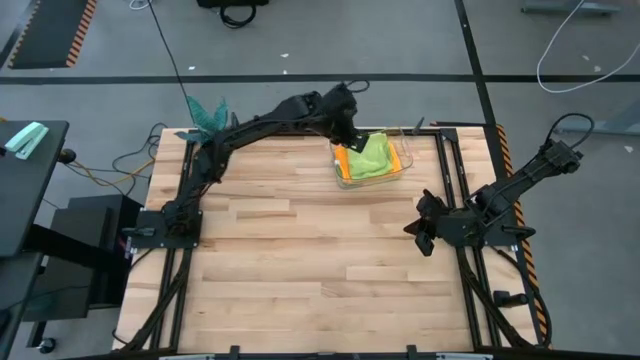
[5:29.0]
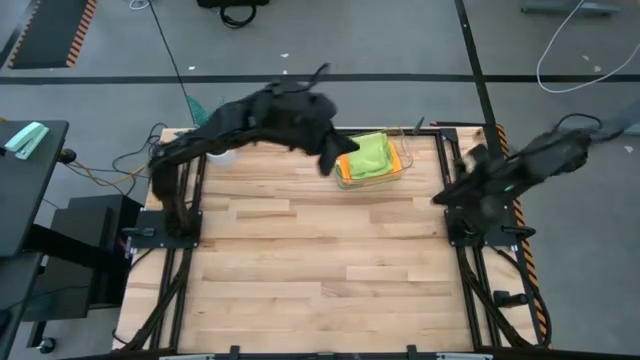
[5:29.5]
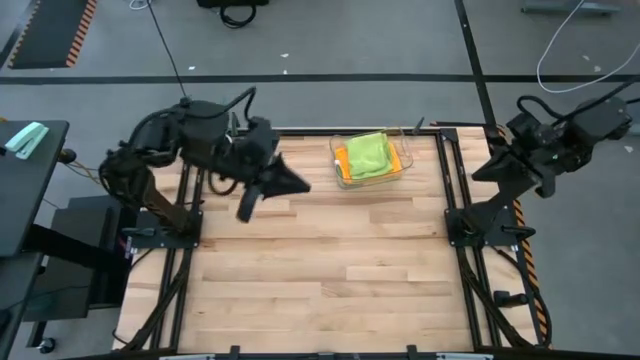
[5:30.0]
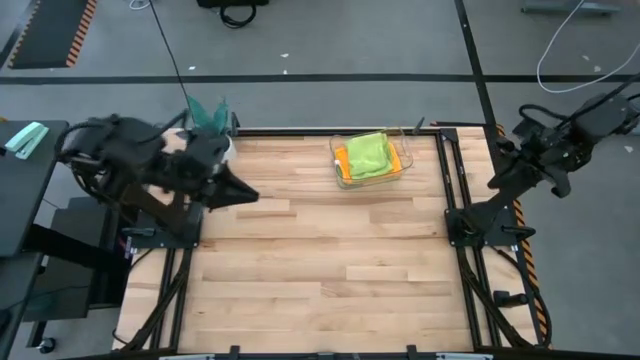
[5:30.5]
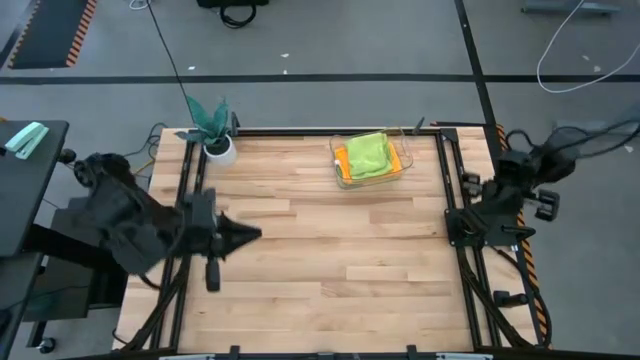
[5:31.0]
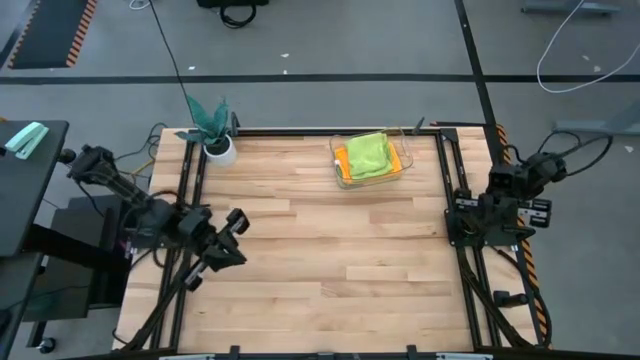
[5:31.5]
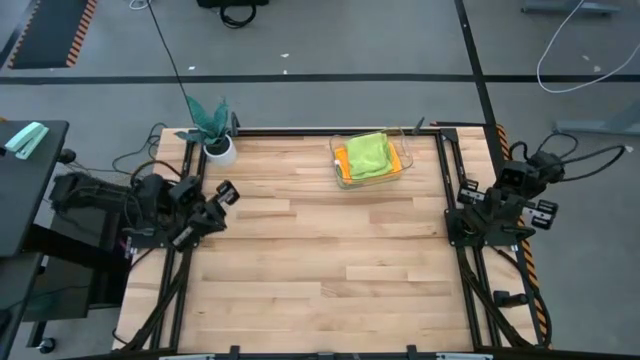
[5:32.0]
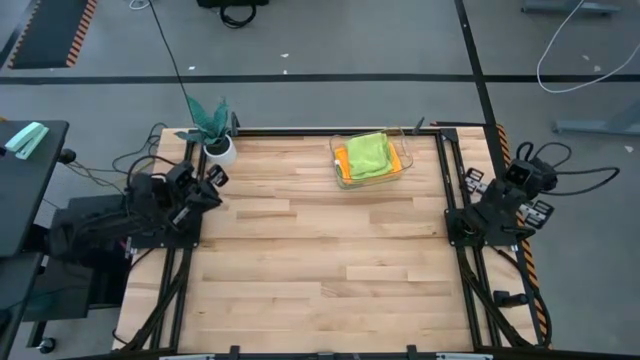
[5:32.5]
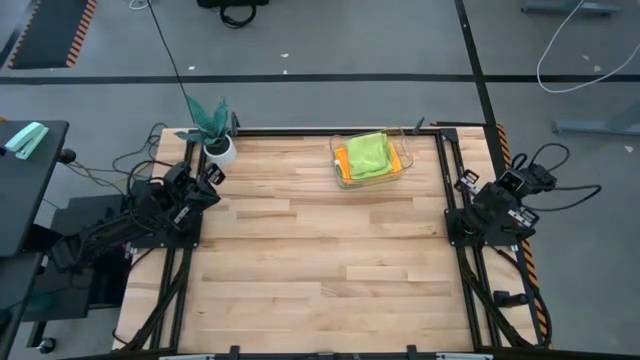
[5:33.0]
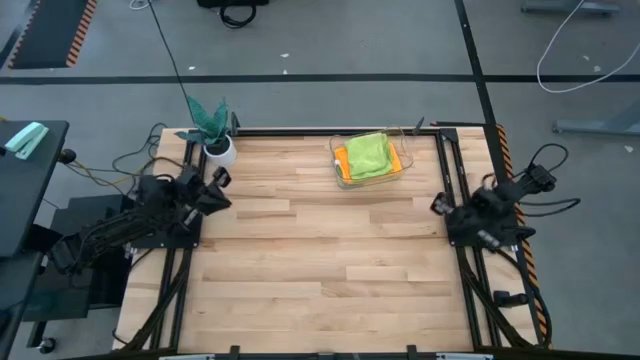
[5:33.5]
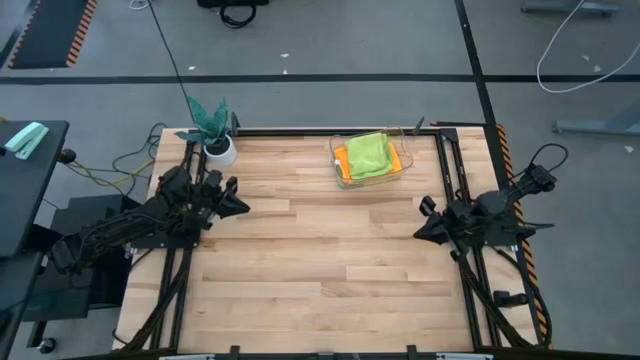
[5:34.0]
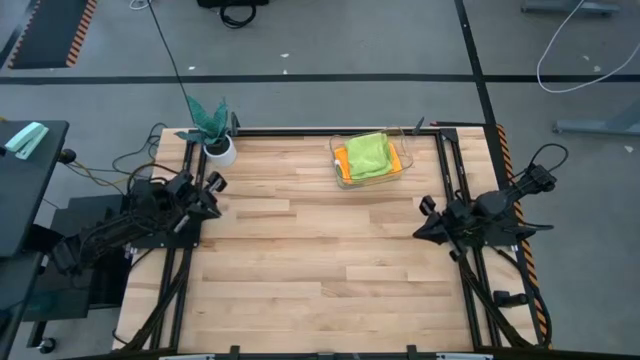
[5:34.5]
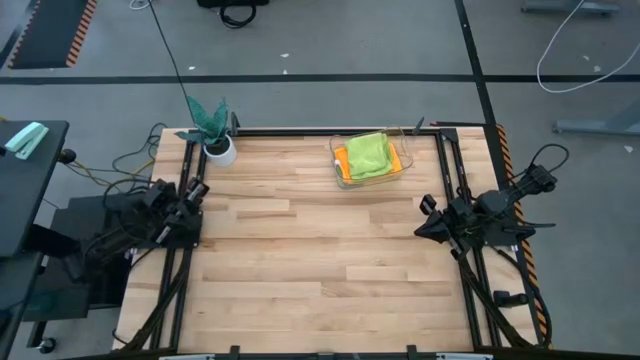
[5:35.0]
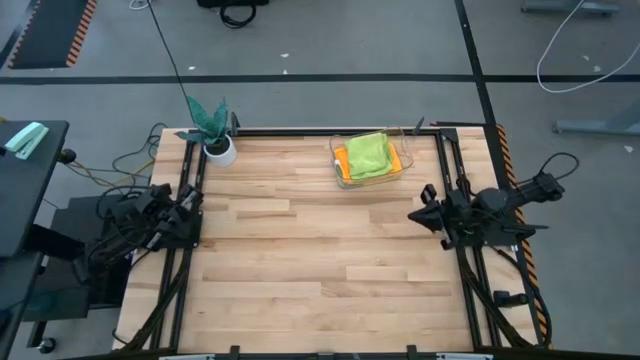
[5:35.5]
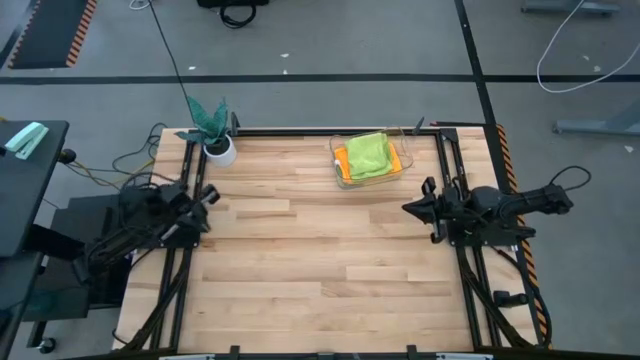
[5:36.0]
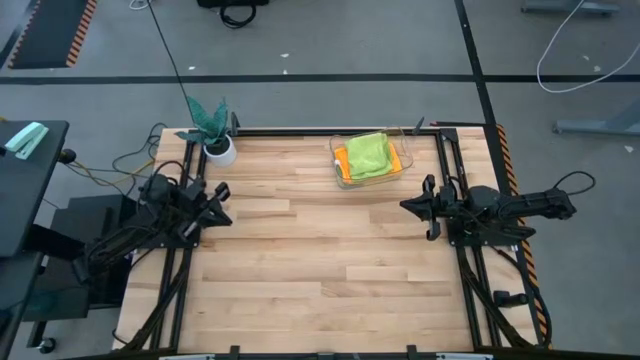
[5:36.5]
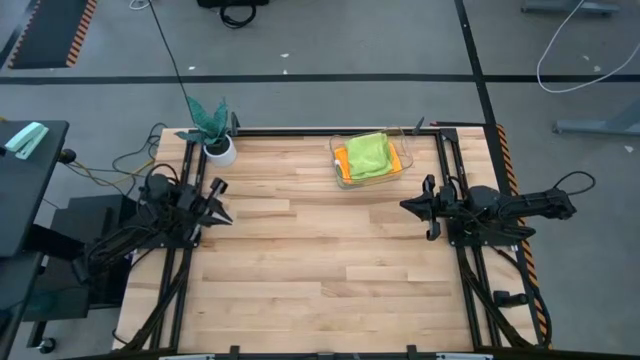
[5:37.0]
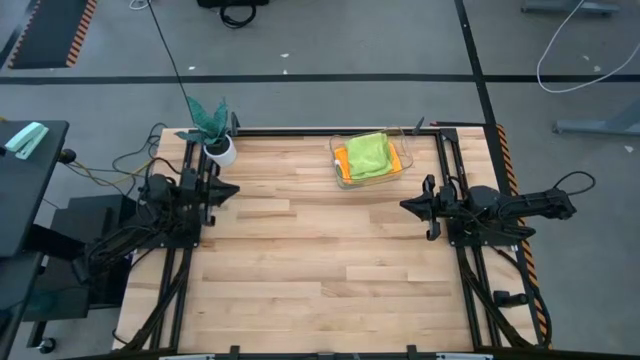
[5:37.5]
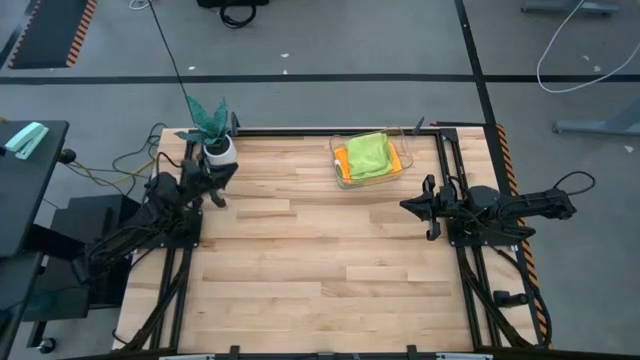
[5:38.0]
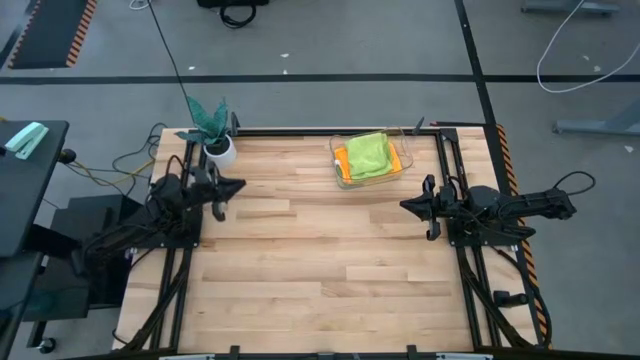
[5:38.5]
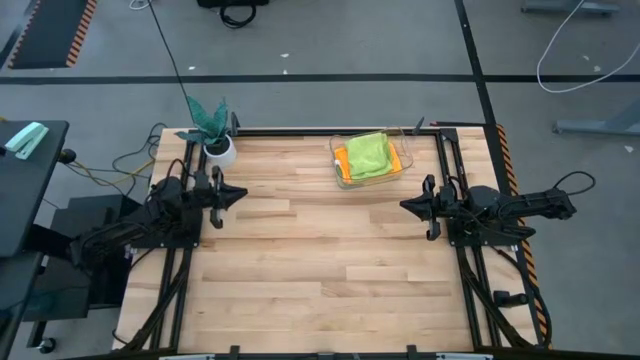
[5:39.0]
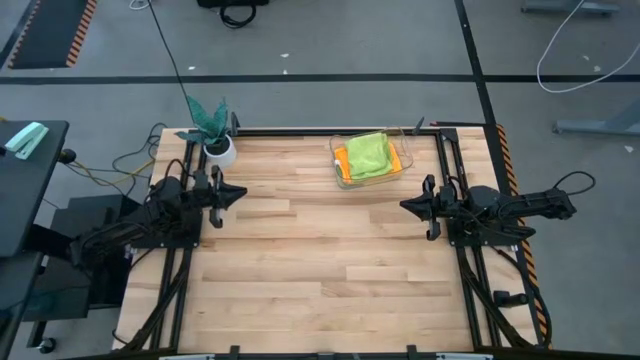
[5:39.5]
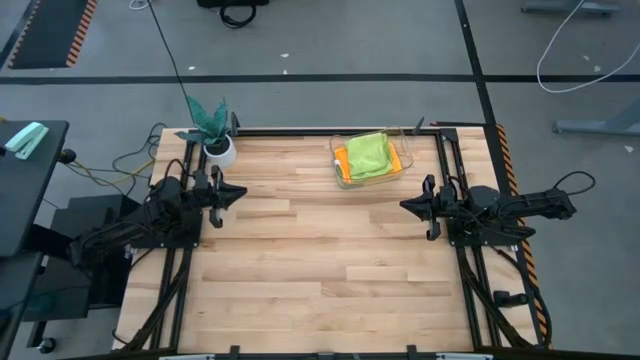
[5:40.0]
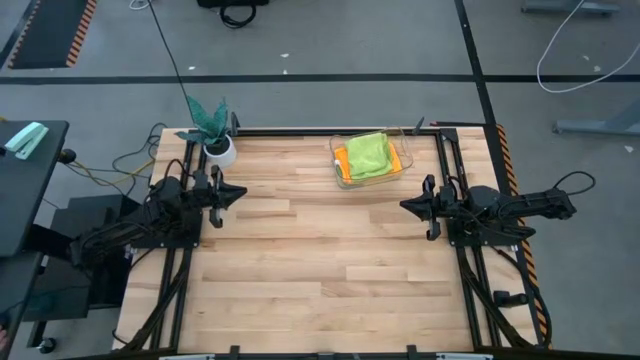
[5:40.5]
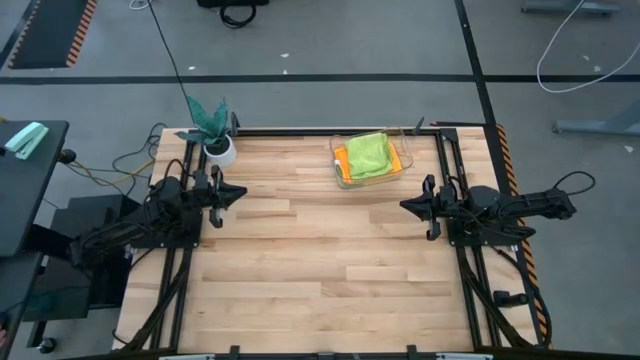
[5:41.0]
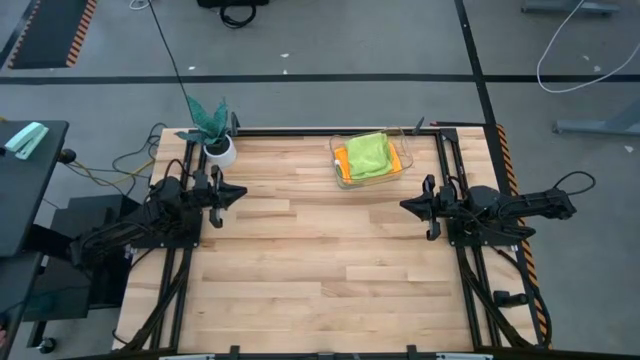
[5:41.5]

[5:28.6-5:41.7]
Task: Fold microfiber towels
Return to Home Position

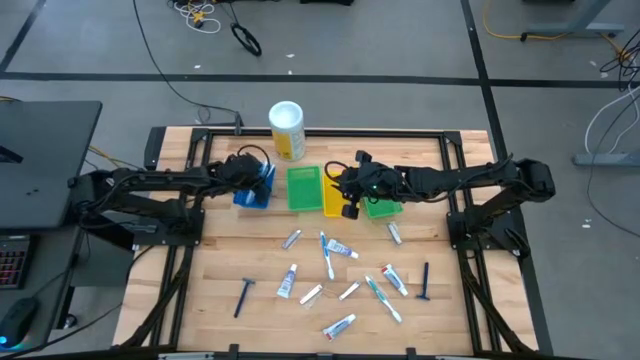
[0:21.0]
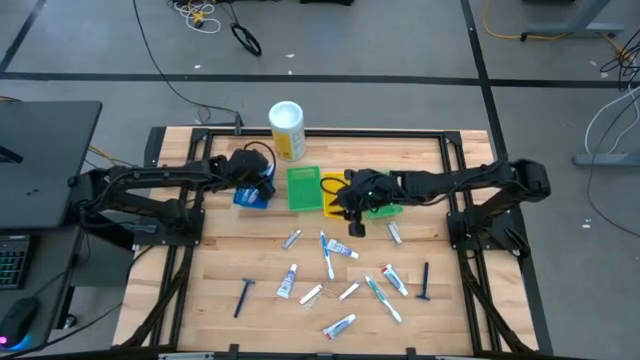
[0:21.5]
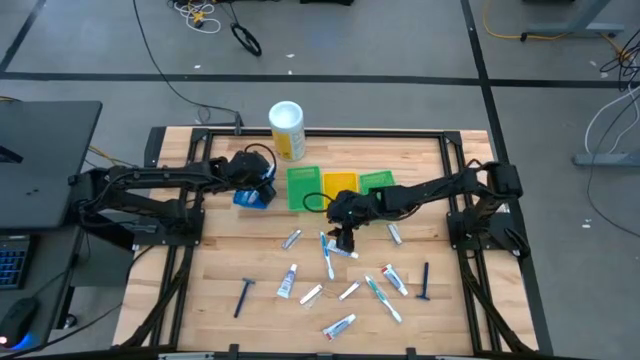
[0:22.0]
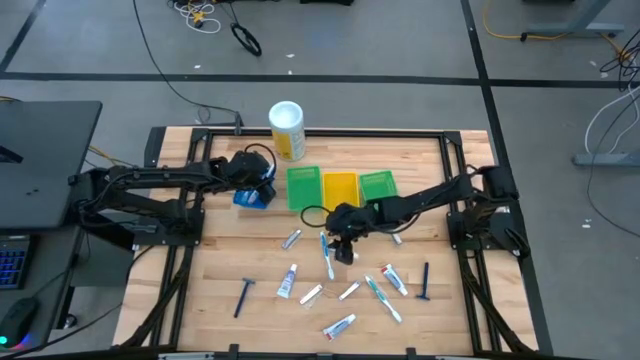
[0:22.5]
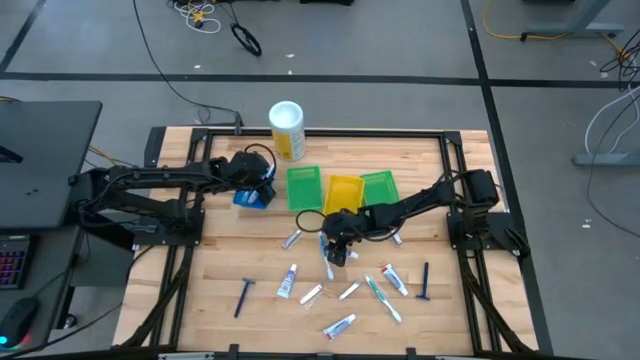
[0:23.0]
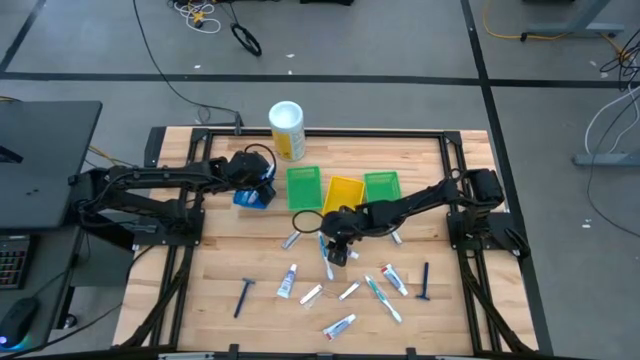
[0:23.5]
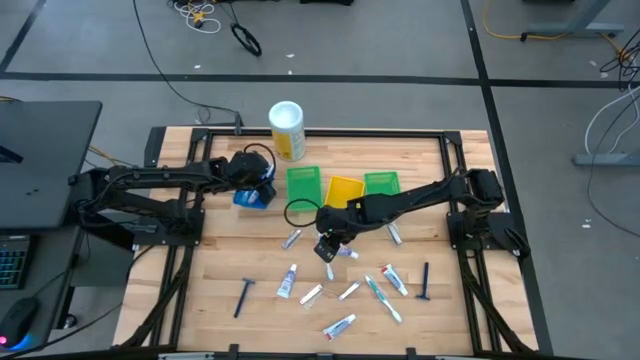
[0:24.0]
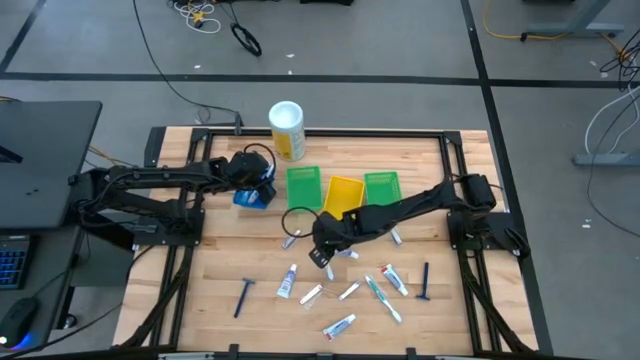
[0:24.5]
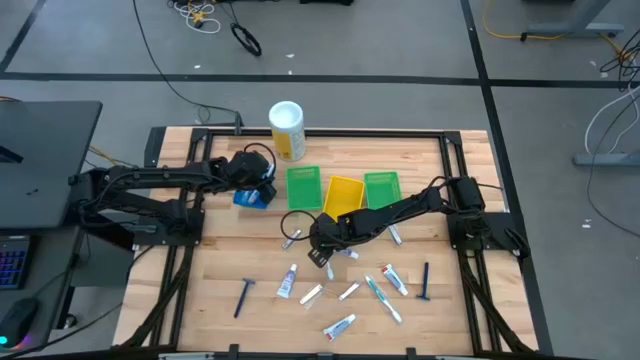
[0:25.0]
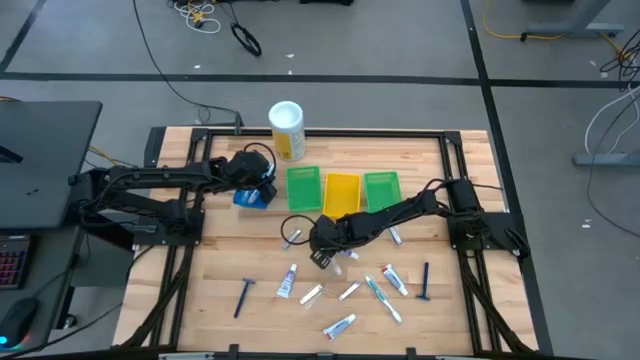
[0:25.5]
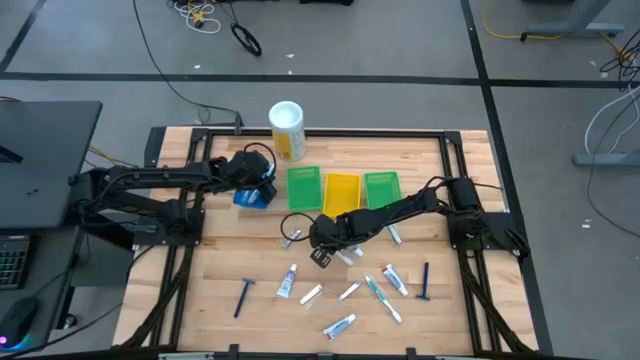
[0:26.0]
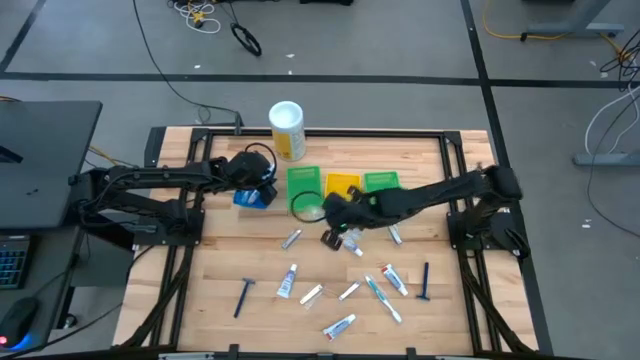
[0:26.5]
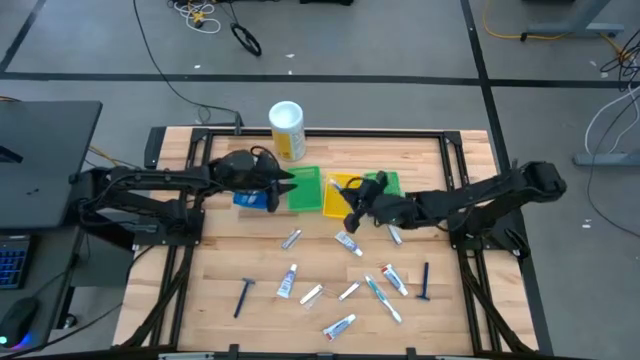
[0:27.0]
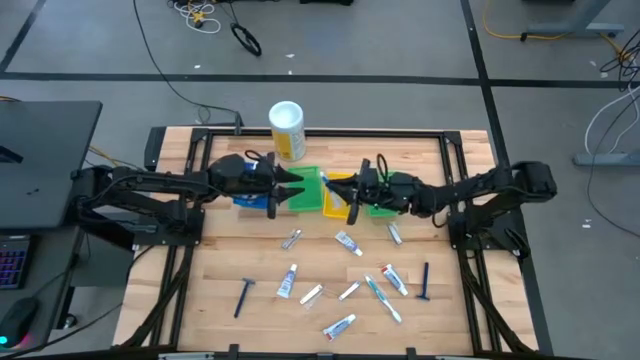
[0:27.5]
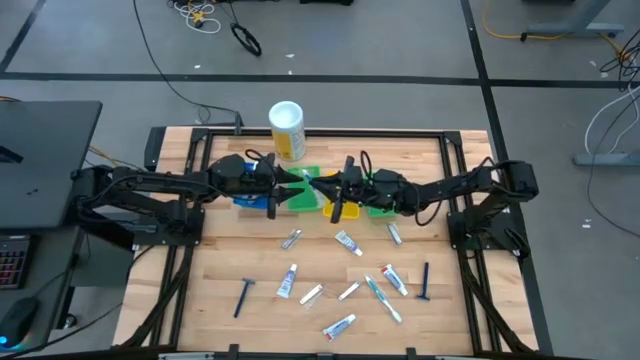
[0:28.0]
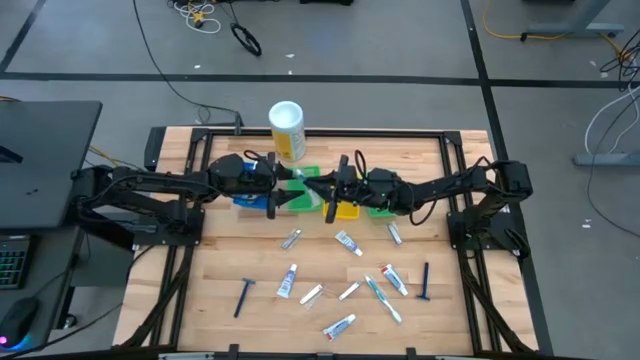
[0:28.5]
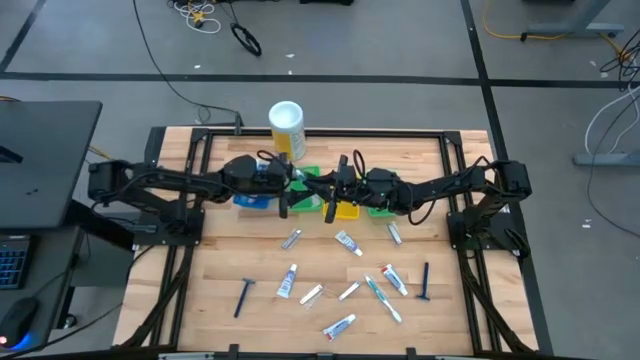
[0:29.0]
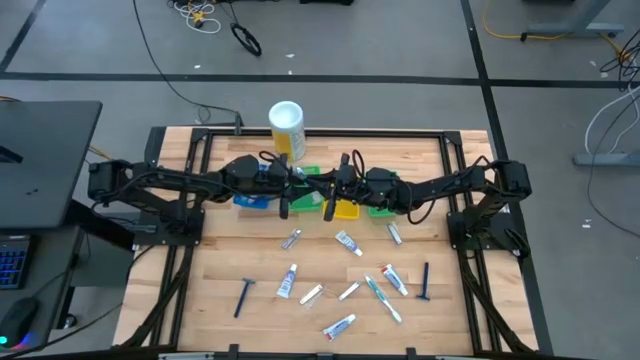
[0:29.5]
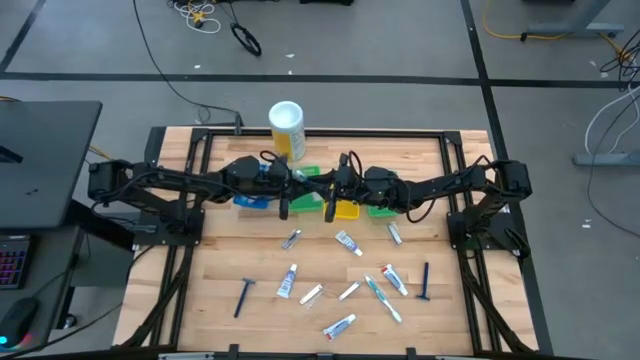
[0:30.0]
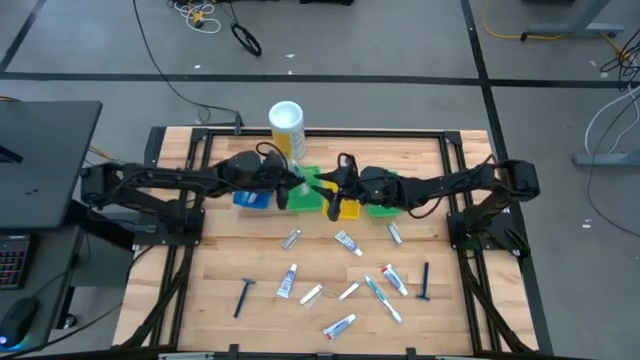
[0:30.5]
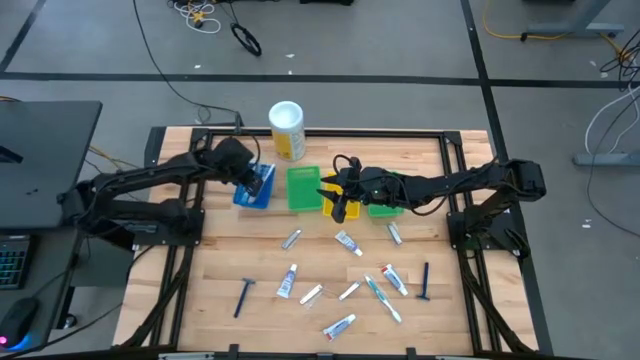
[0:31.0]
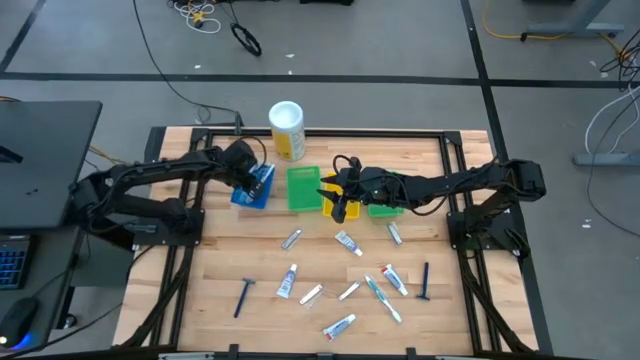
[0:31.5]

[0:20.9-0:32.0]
Task: Pick & Place Travel size toiletries
Put the blue toothbrush into the blue bin
